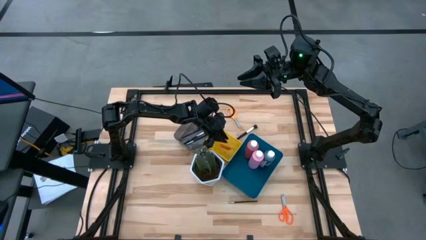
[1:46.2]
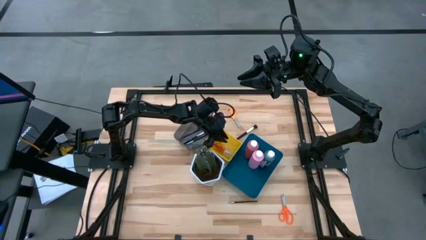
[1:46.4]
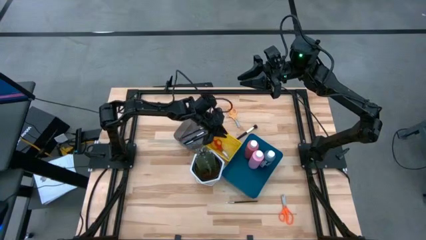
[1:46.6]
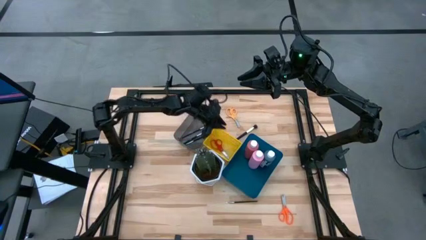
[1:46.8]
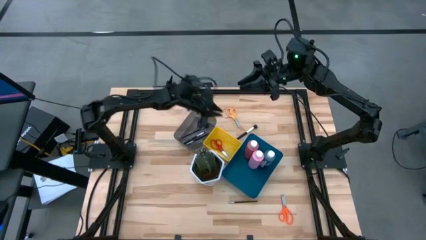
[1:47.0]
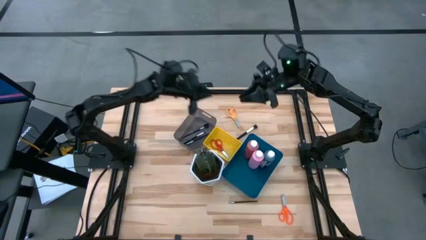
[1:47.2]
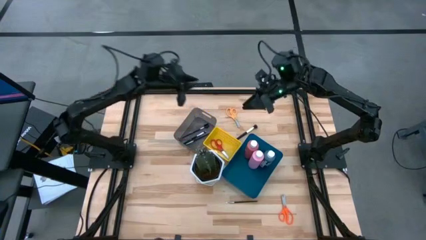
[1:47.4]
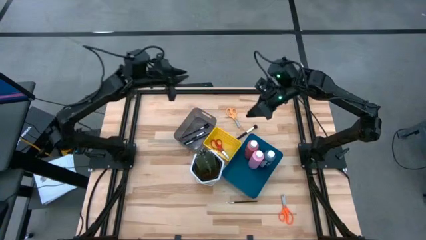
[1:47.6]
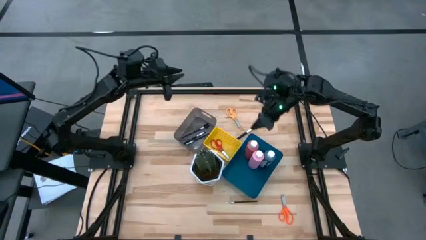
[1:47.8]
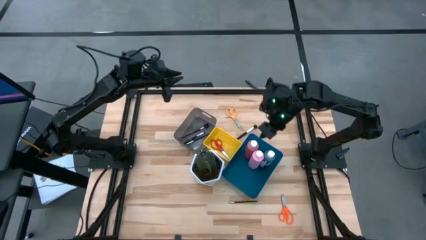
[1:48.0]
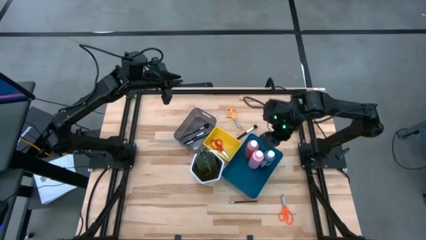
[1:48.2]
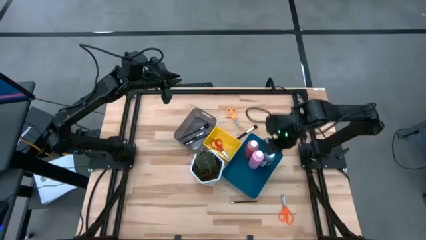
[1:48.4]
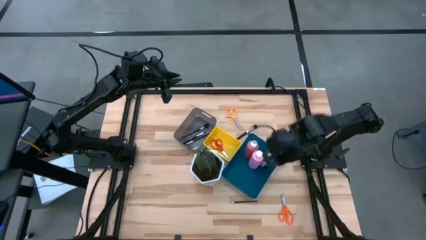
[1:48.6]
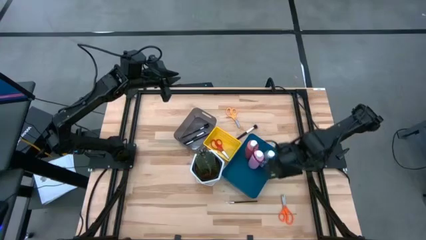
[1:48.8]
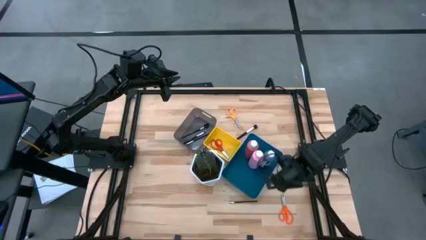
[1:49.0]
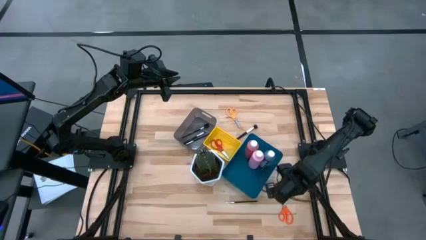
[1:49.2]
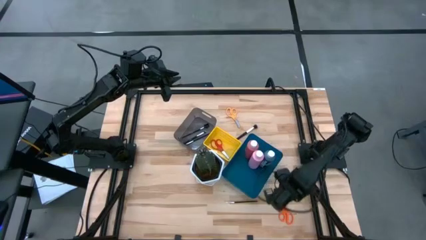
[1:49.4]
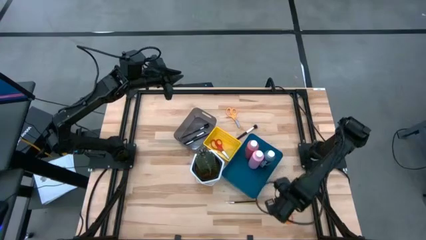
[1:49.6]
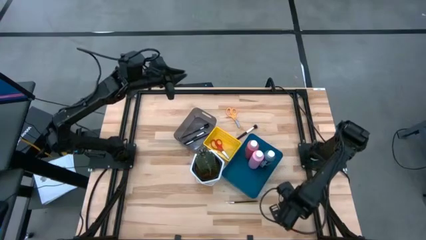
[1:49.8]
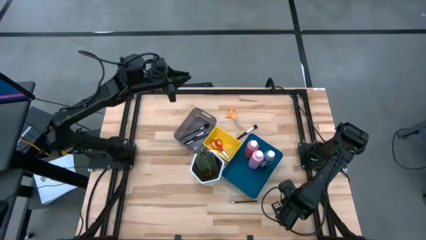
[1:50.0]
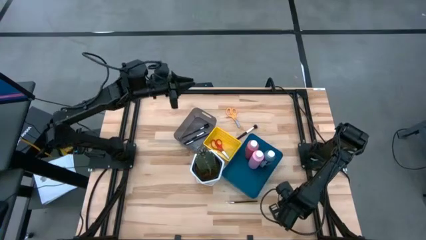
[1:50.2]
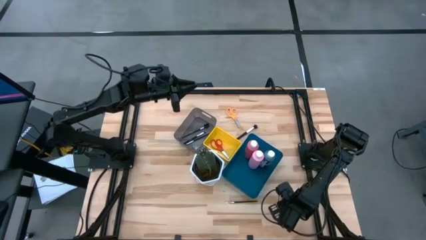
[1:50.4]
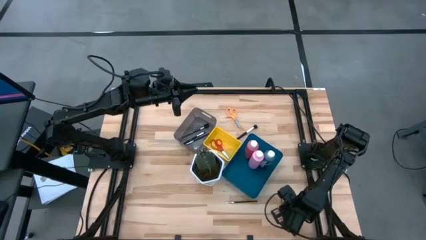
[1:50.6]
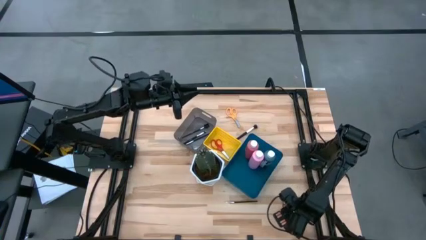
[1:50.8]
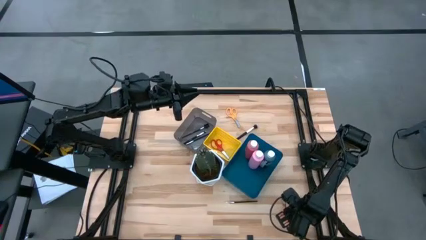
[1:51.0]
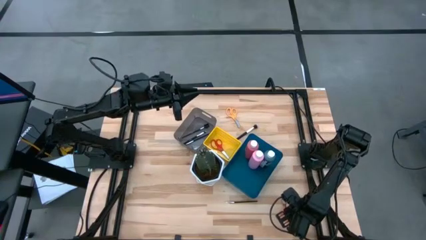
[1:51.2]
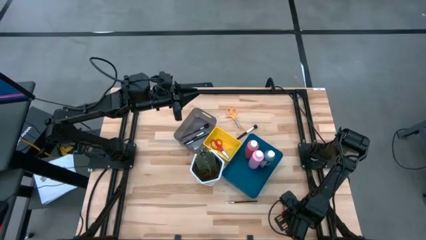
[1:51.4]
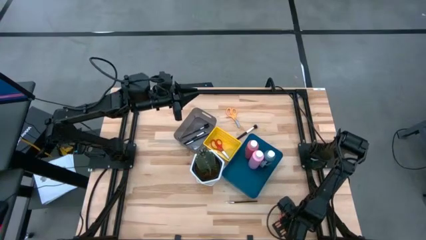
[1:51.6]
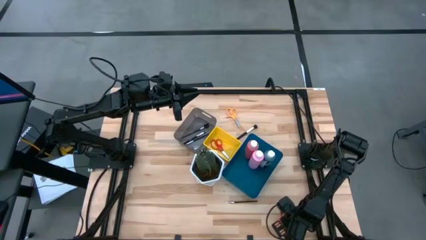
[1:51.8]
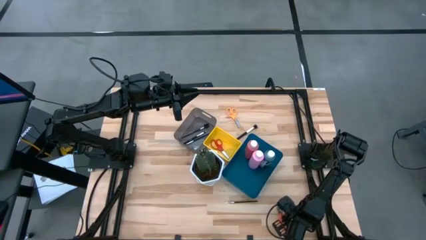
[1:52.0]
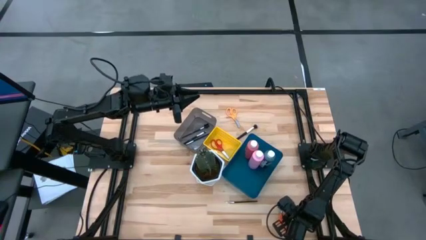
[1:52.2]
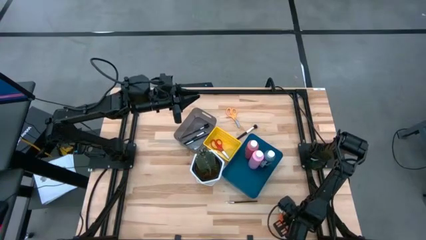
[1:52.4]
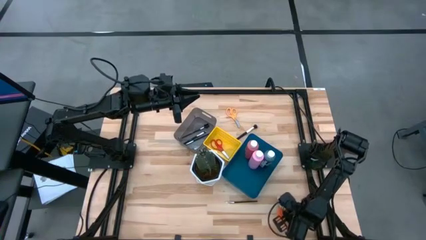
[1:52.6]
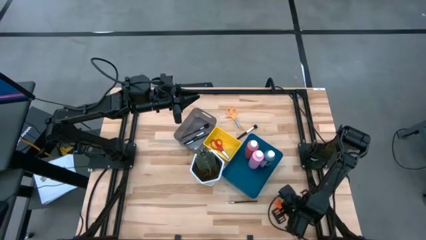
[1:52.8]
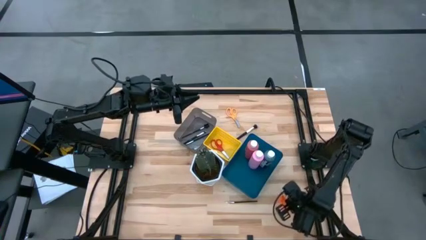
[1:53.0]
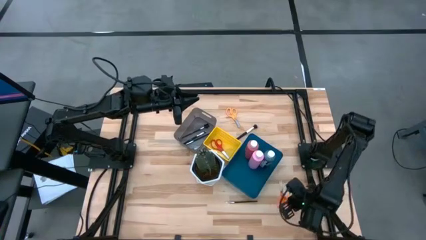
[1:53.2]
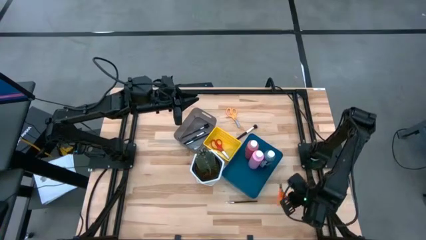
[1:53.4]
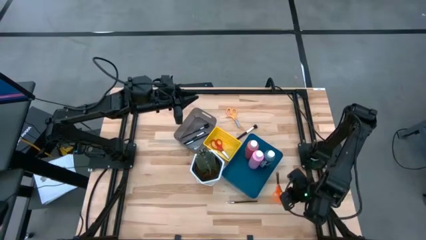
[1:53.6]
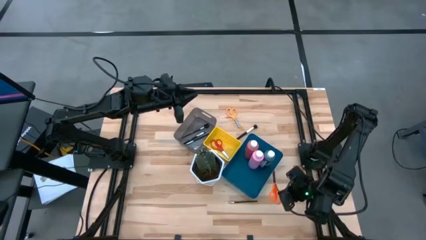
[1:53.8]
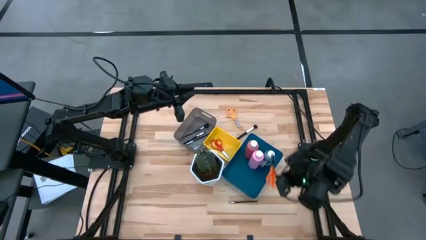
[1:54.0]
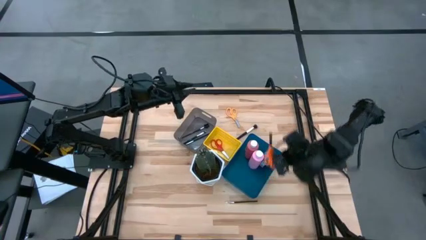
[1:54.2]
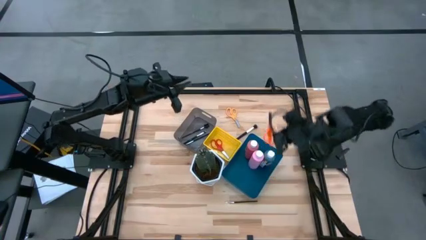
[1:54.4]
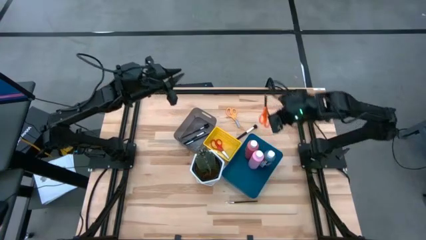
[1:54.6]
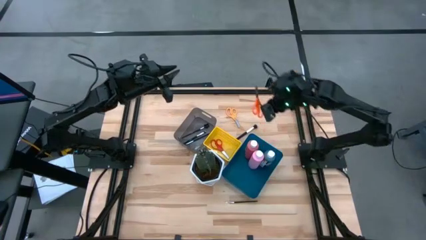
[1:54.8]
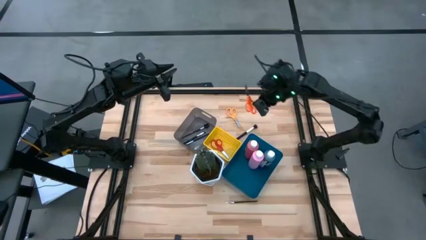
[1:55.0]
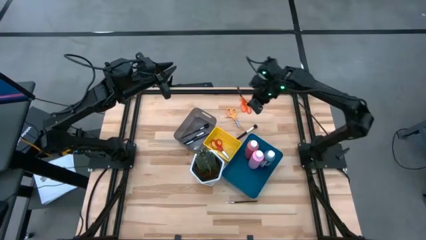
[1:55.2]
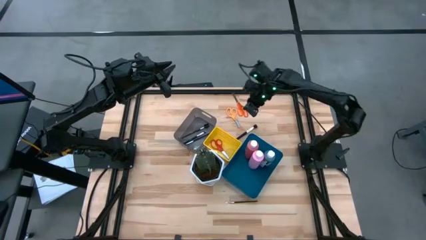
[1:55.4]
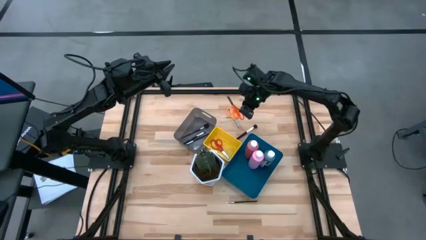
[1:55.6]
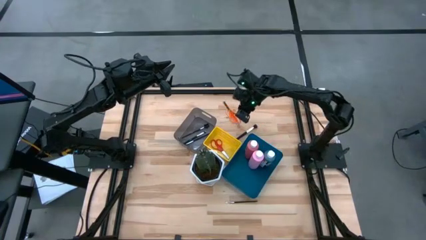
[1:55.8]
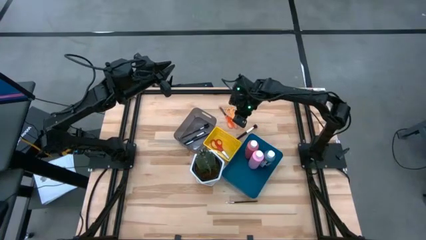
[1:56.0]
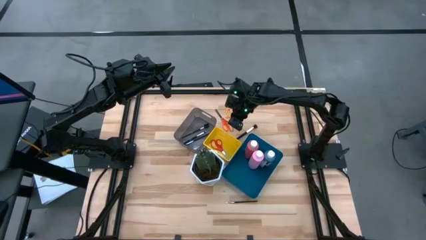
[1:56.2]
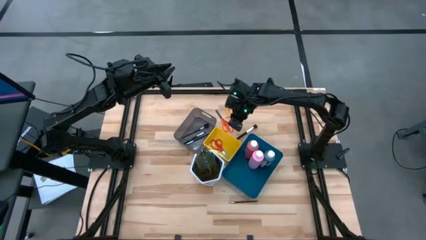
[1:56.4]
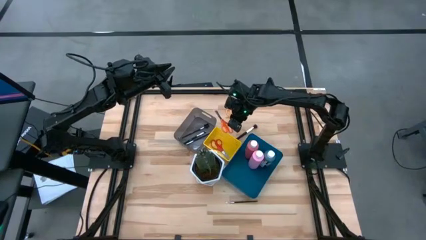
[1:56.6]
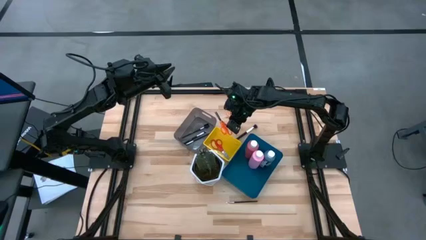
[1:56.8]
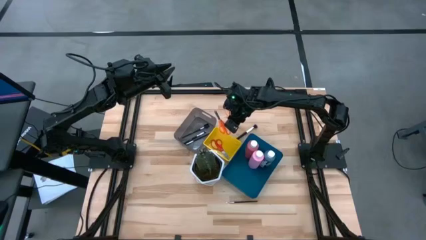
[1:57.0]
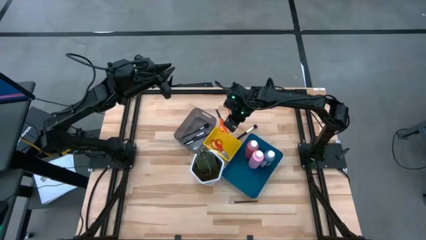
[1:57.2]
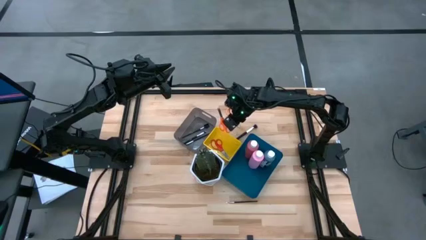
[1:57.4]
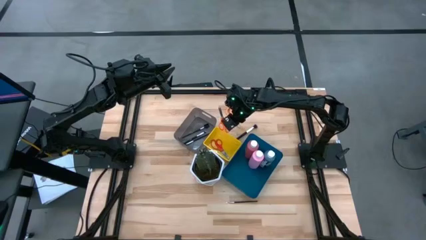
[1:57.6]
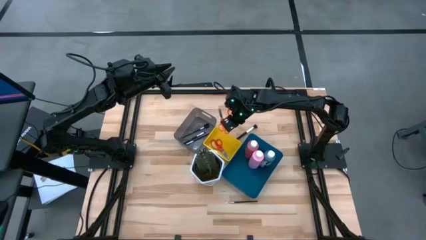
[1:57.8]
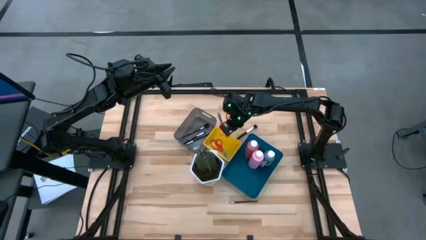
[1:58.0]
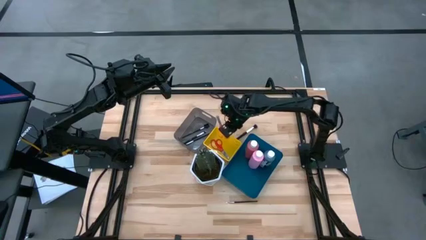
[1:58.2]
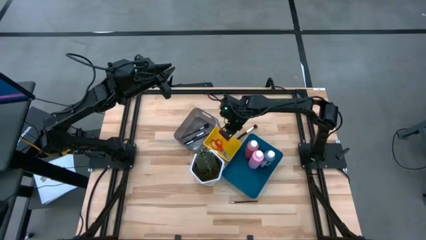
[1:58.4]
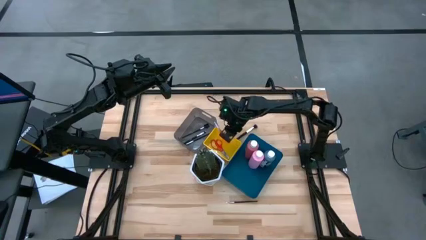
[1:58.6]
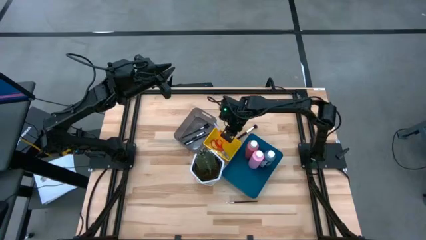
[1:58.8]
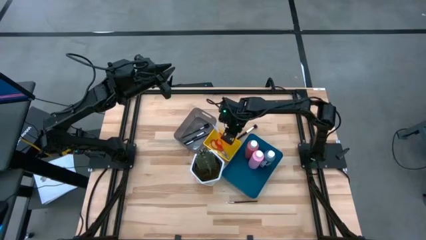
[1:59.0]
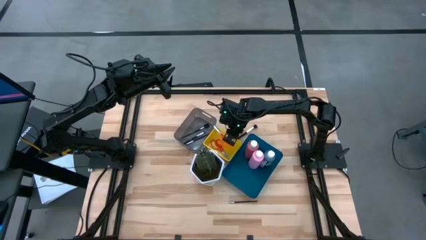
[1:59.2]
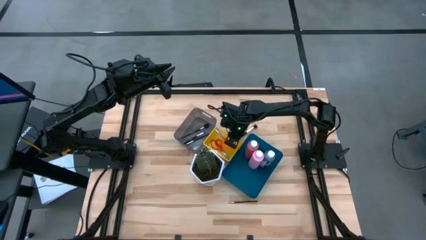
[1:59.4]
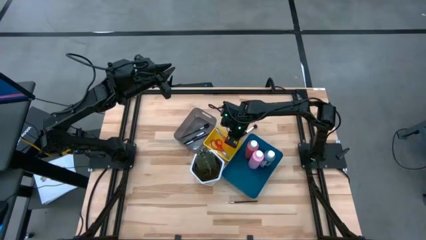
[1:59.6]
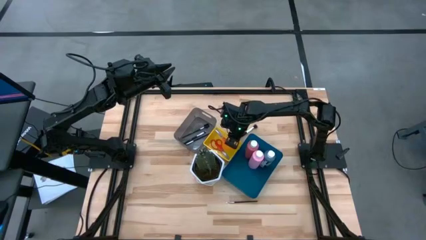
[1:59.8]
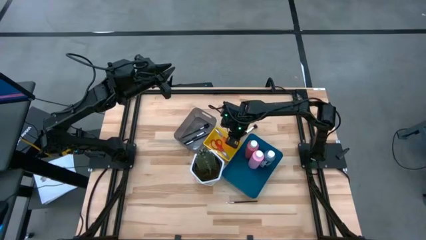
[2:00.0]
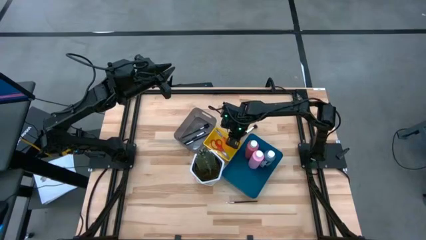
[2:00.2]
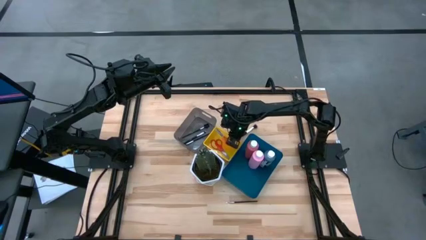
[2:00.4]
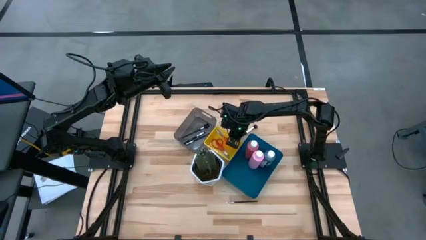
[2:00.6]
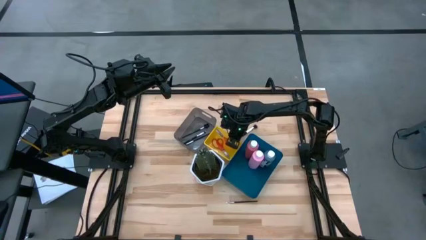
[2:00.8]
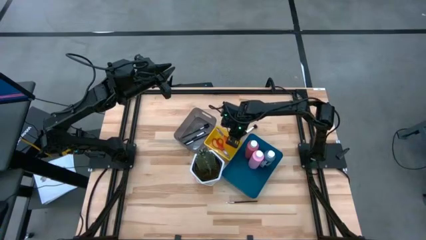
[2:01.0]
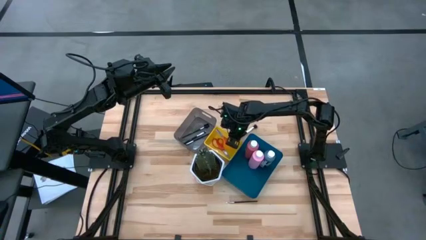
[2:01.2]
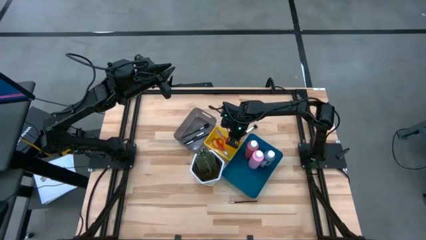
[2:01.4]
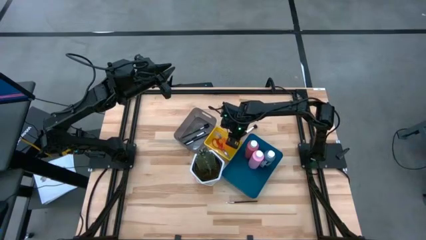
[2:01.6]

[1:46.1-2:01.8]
Task: Pick & Place Paint Supplies
Put the orange scissors into the yellow bin
